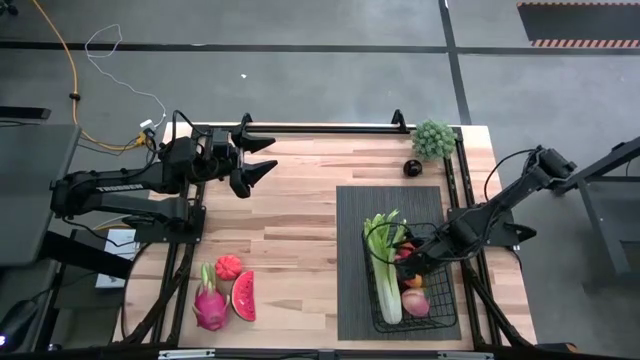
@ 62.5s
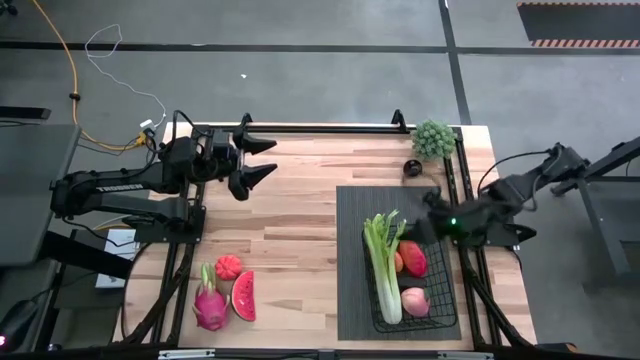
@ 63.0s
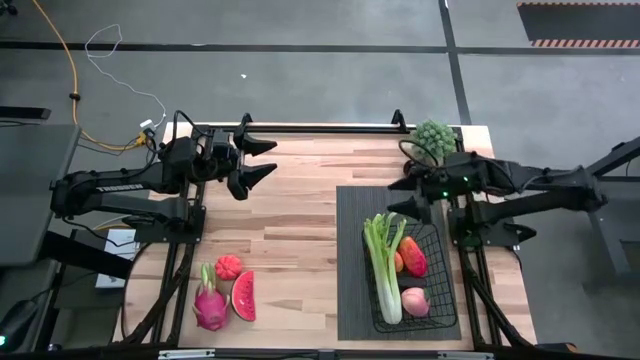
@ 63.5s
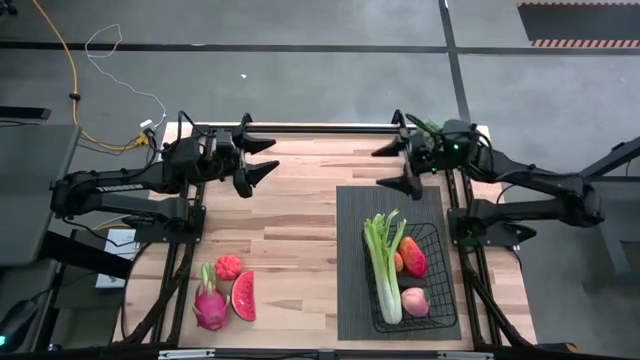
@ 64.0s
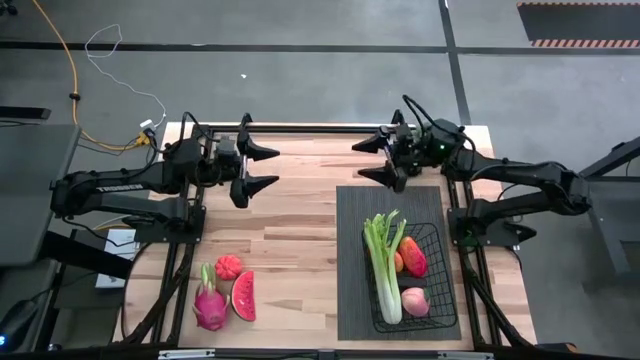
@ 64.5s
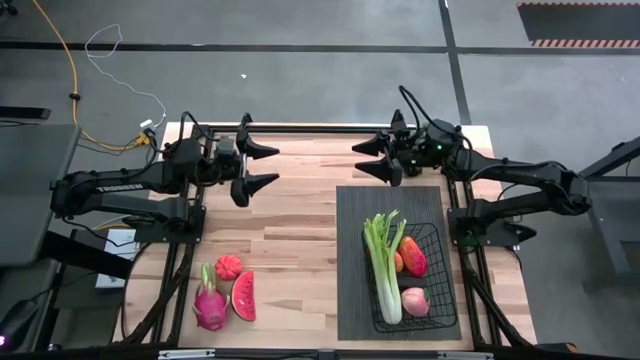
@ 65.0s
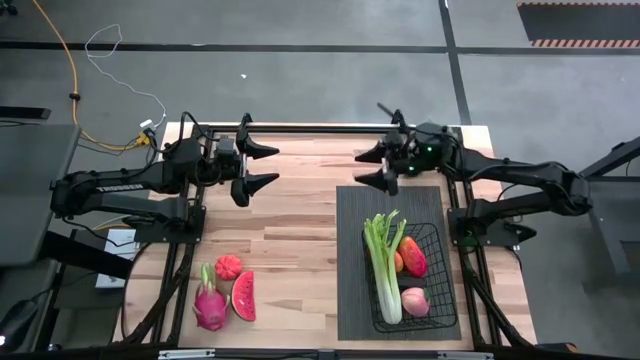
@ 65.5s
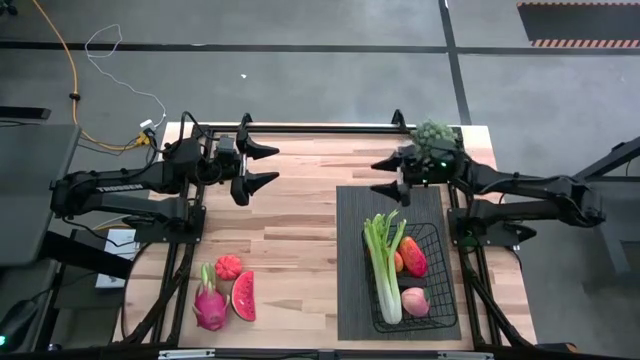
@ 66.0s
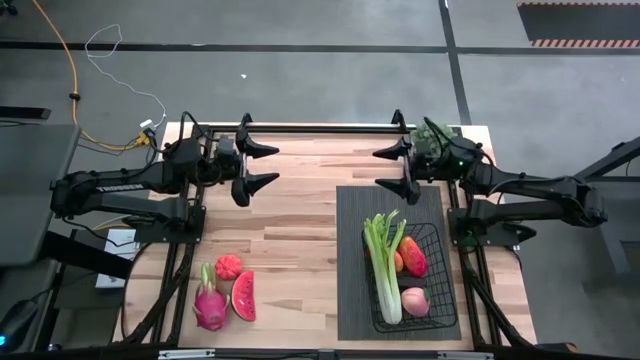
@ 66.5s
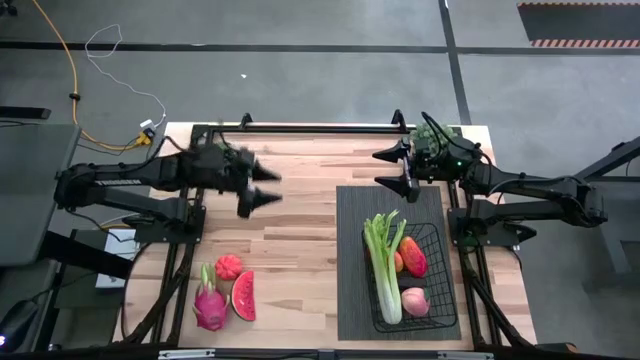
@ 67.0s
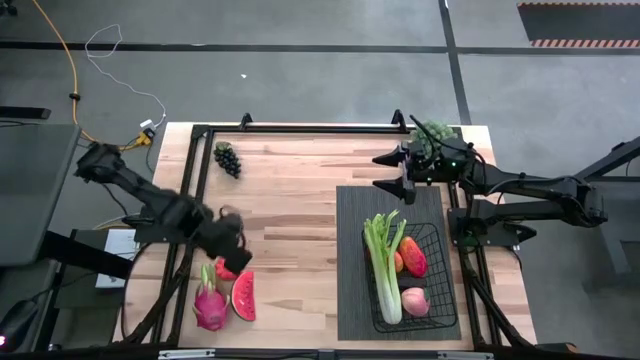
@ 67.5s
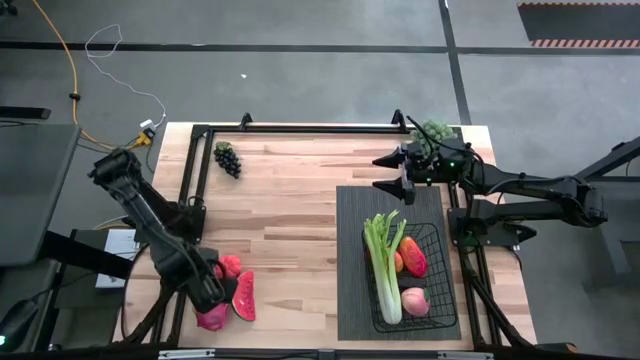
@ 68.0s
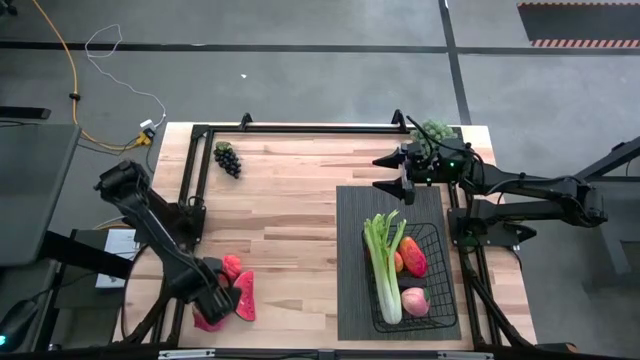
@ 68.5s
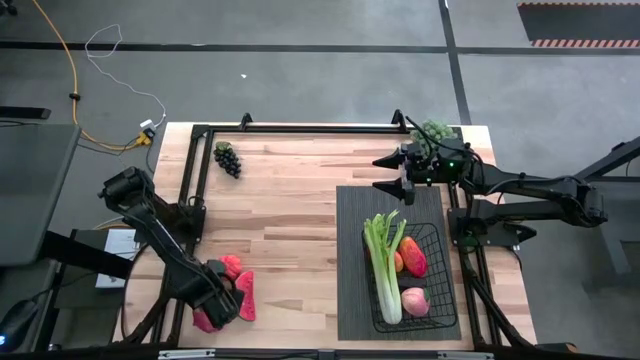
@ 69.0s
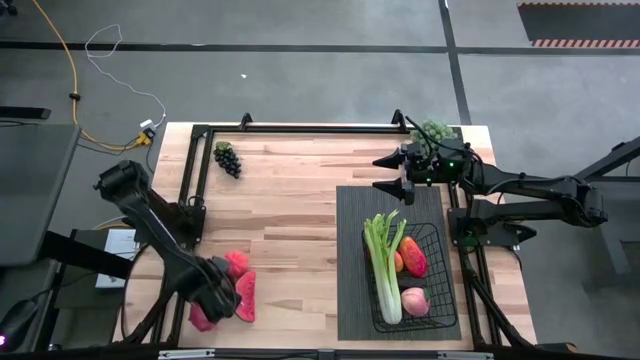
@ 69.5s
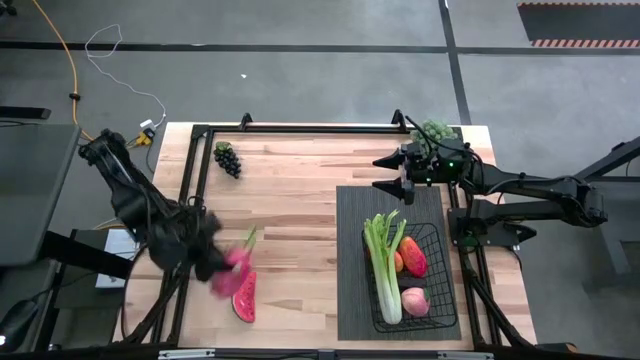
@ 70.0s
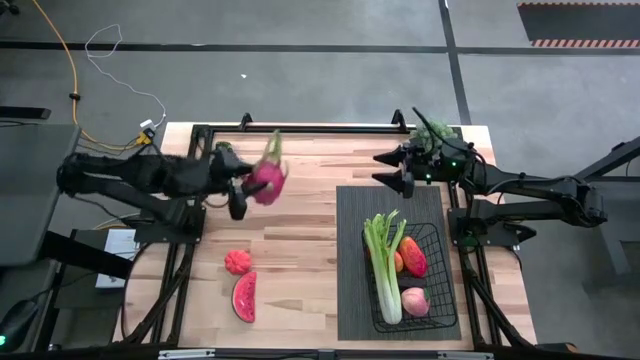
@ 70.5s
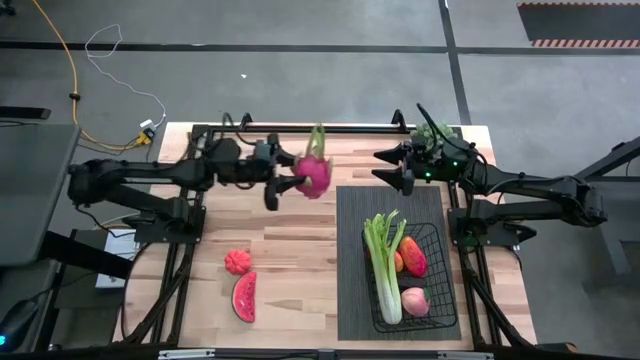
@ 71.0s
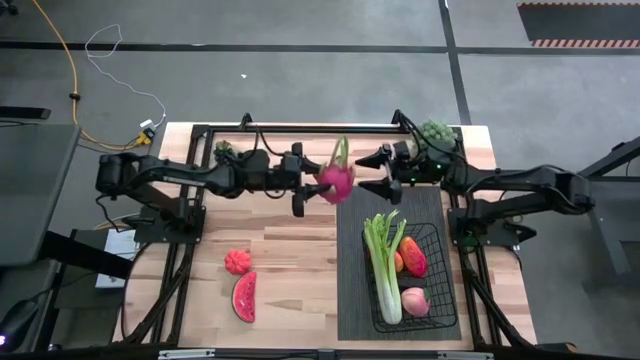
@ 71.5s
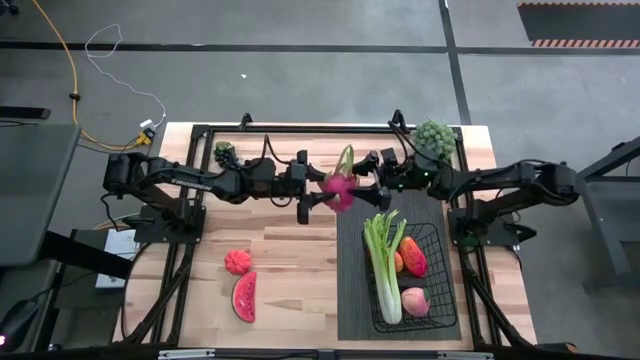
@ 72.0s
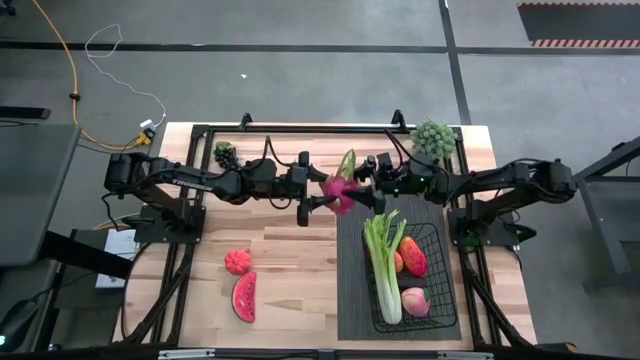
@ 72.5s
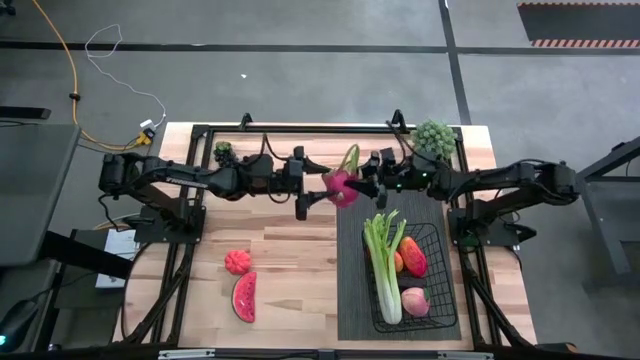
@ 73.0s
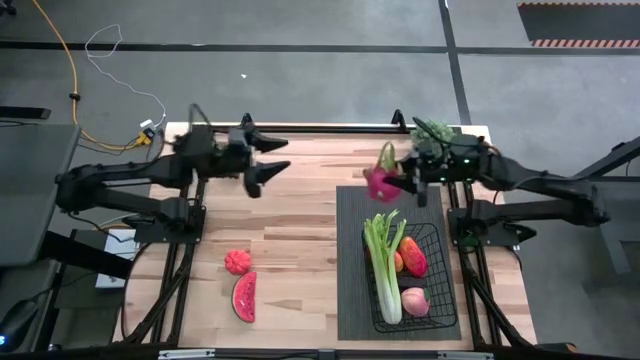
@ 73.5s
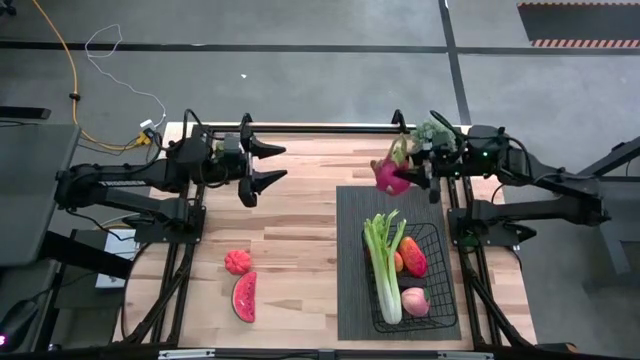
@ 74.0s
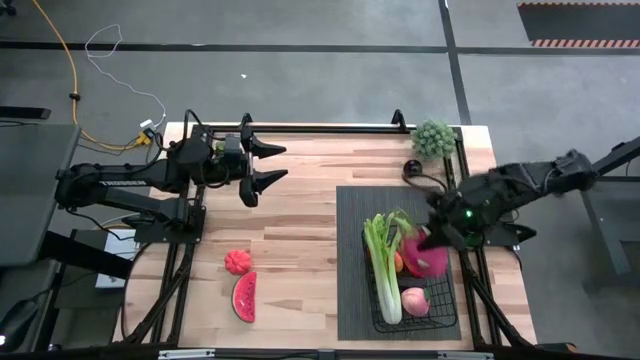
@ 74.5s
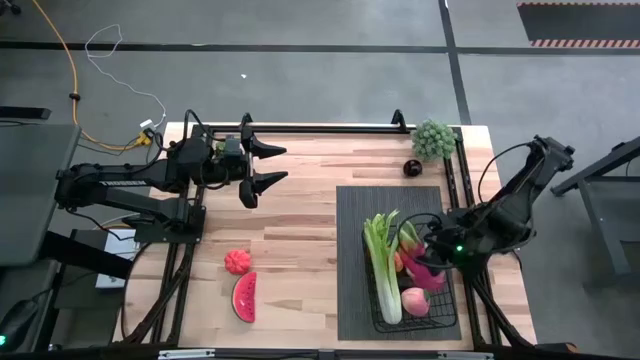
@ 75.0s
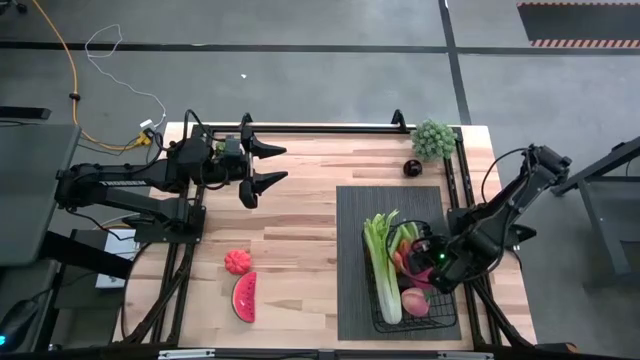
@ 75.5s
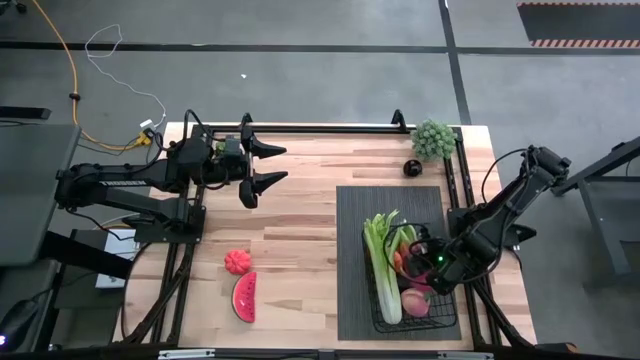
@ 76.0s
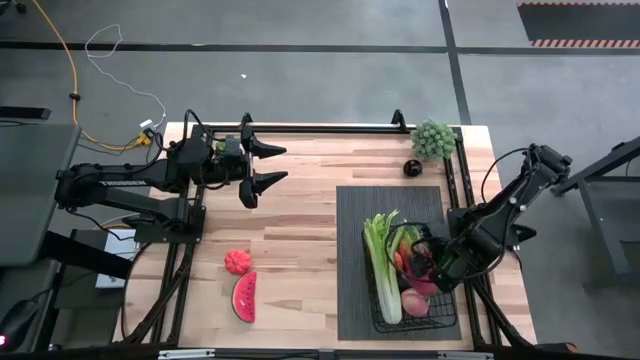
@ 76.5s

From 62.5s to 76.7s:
Task: Build produce basket
Put the dragon fruit into the black wire basket

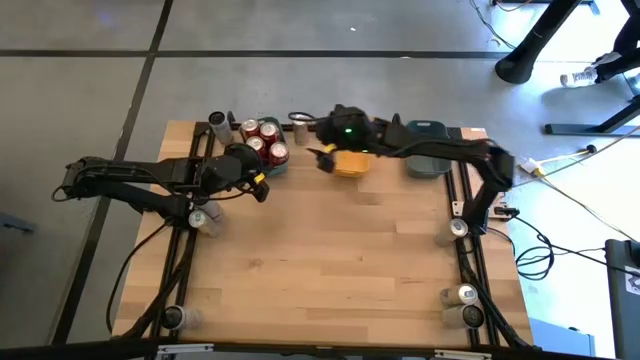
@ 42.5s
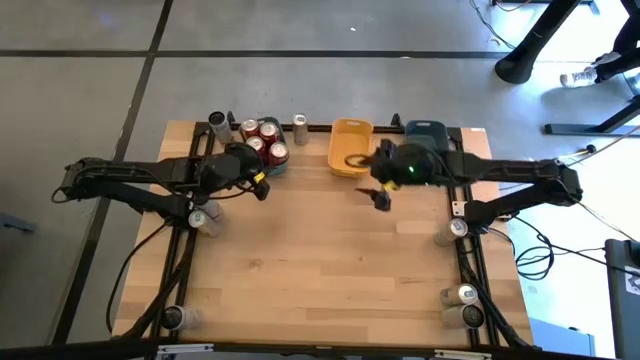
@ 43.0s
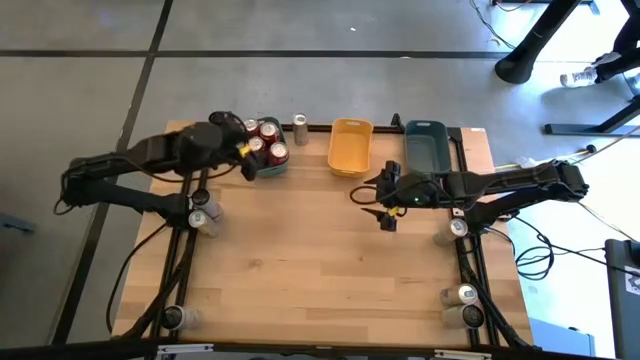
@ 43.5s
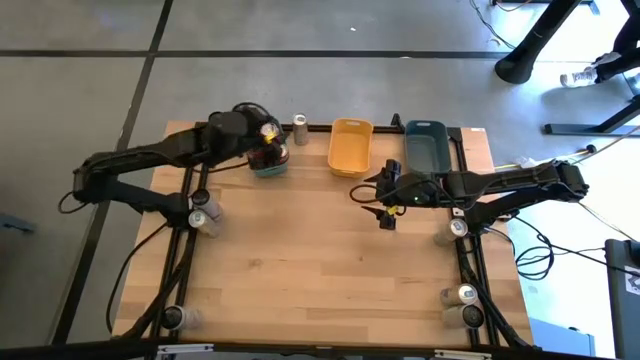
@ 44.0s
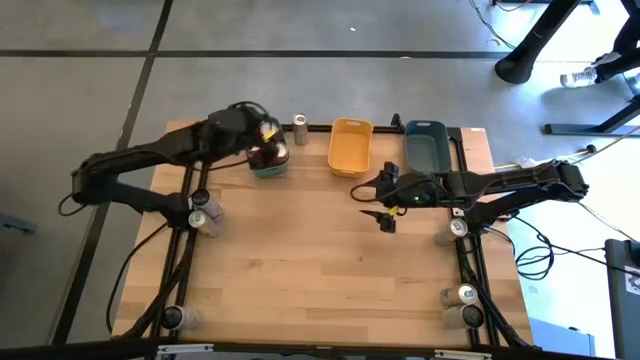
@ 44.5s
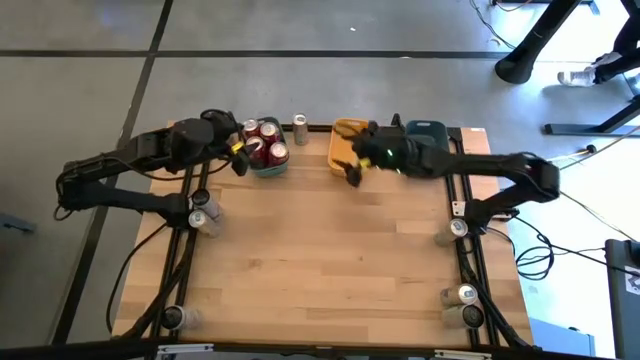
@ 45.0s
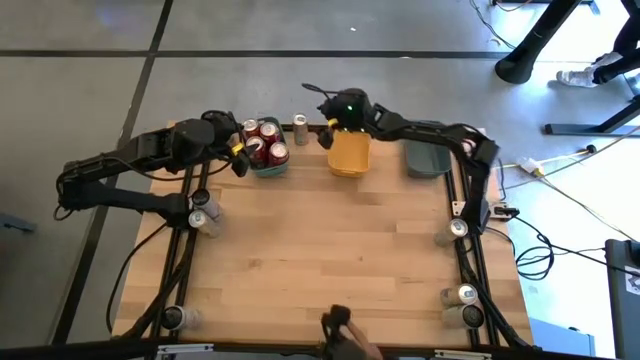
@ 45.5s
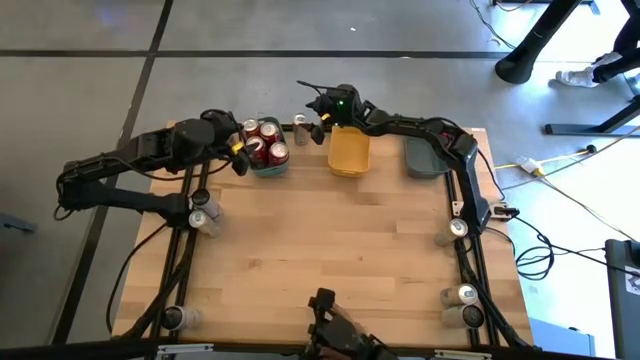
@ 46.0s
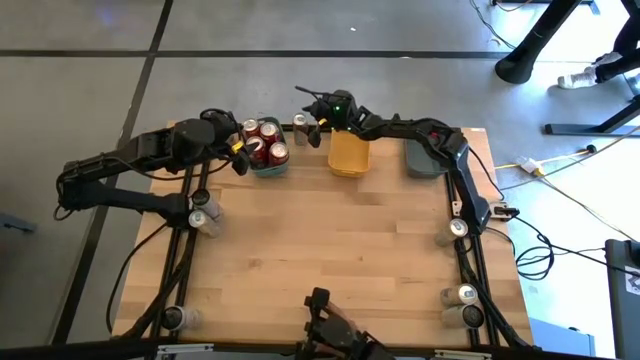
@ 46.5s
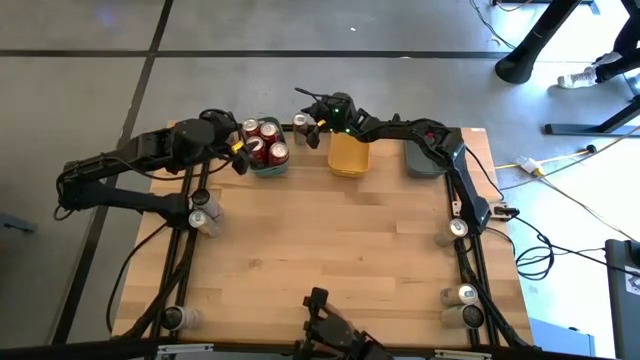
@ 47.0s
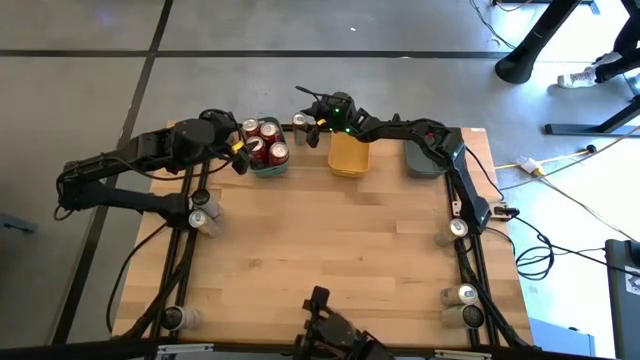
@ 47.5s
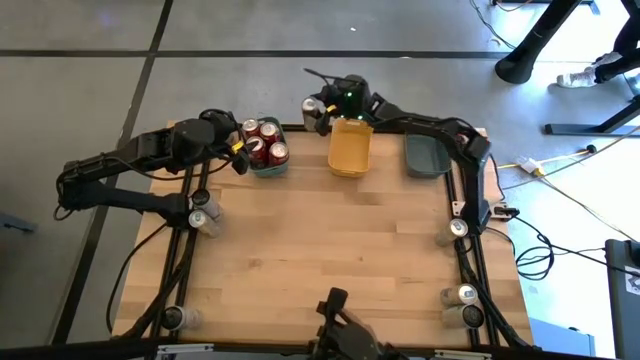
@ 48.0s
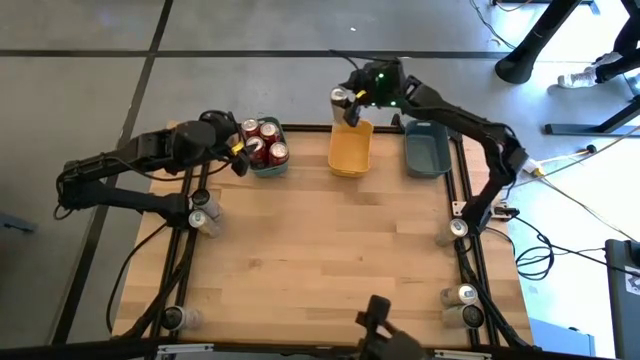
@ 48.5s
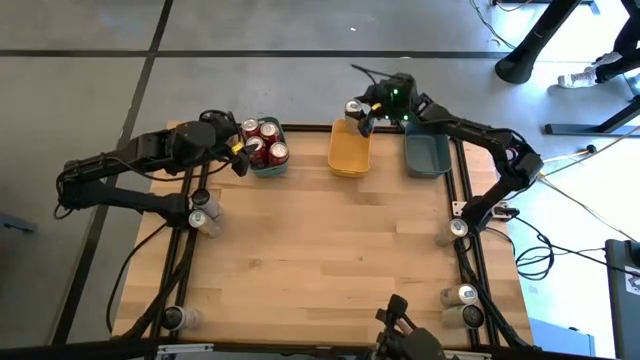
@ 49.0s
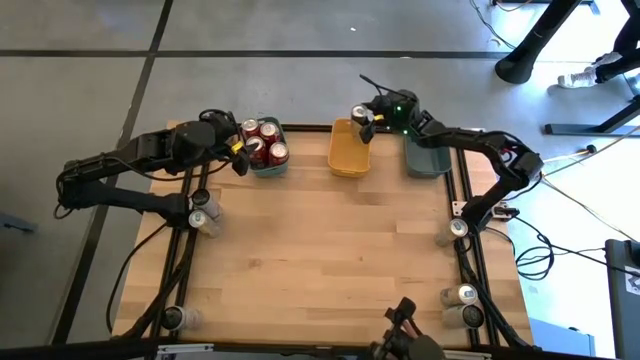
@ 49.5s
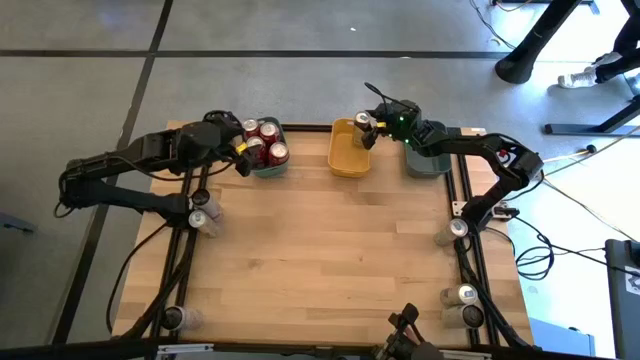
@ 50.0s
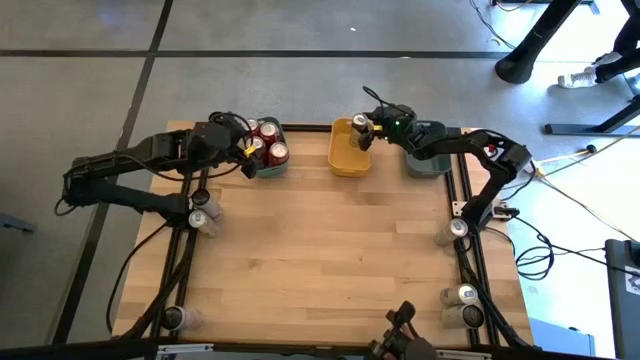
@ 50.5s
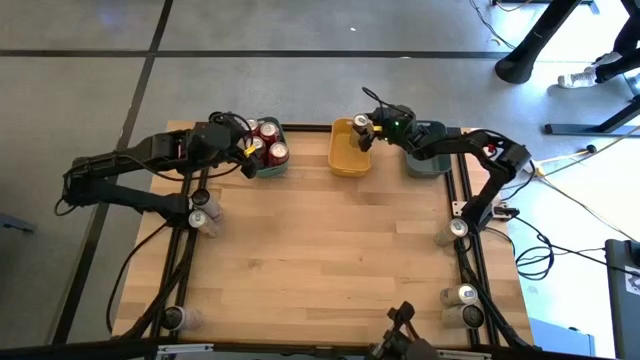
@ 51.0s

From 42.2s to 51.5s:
Task: Sort soda cans
Put the top blue soda can into the yellow bin
